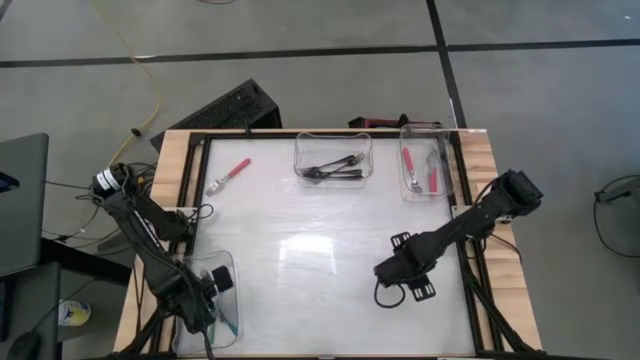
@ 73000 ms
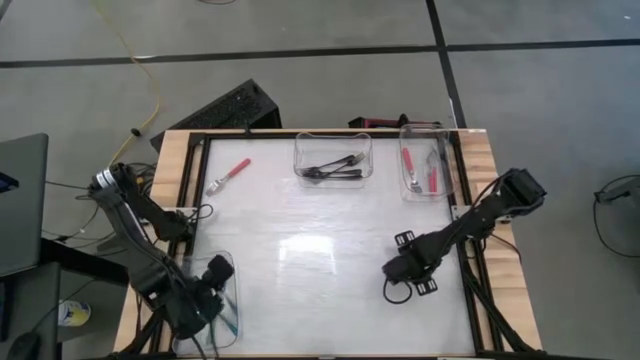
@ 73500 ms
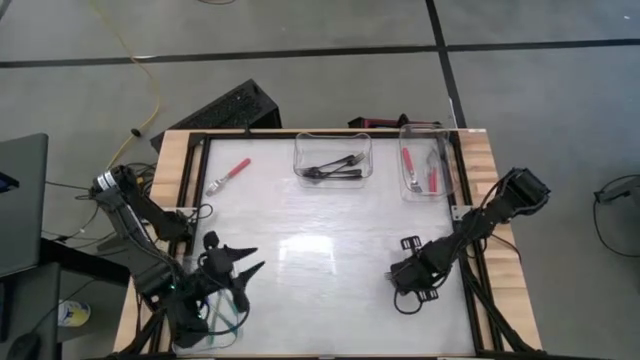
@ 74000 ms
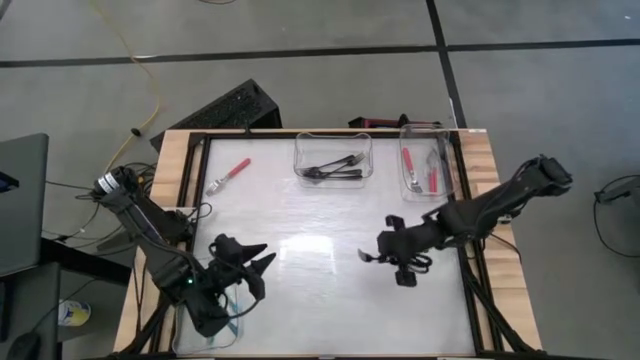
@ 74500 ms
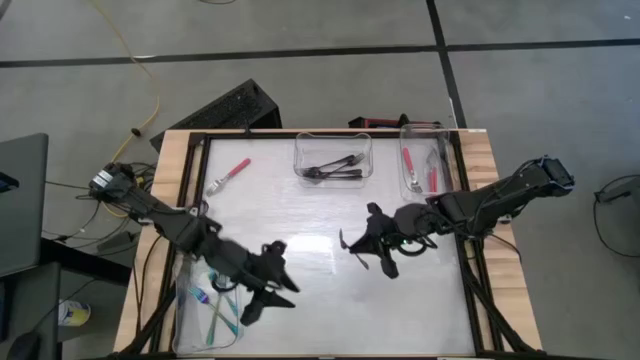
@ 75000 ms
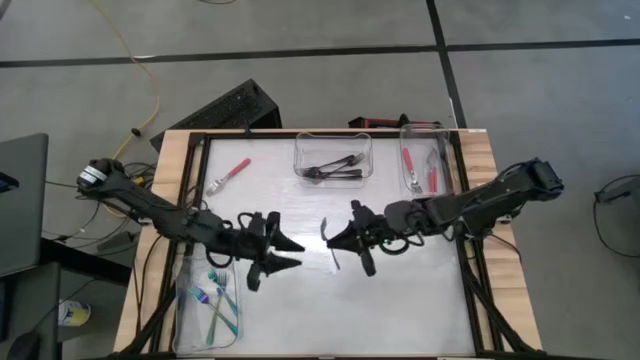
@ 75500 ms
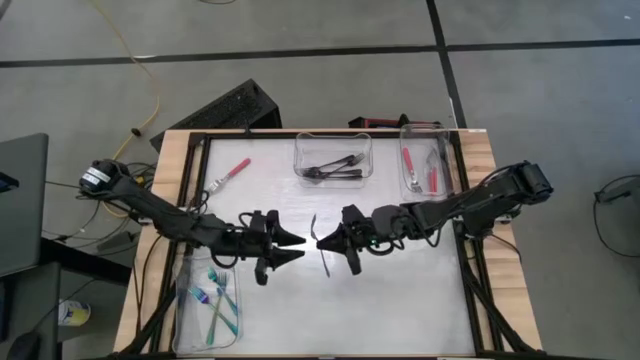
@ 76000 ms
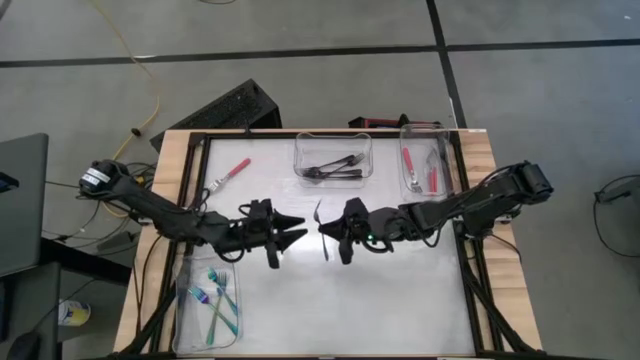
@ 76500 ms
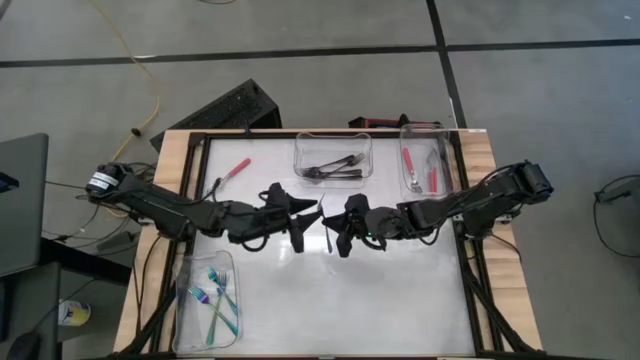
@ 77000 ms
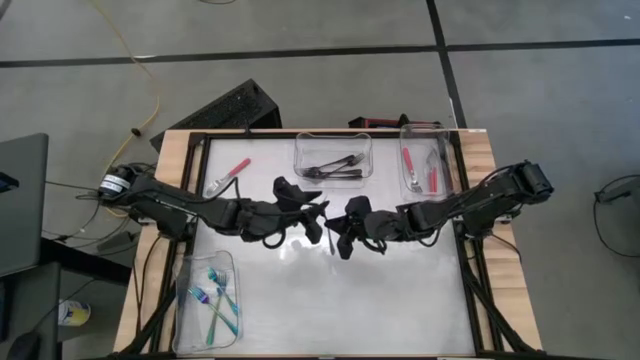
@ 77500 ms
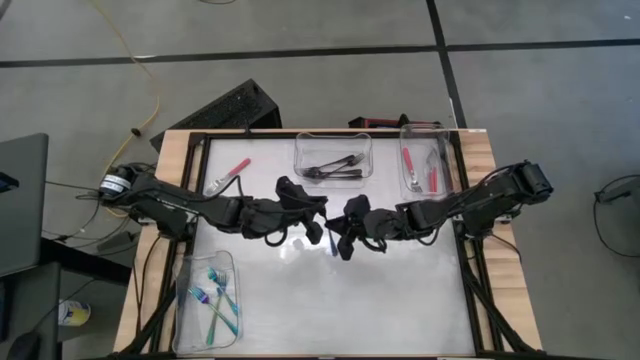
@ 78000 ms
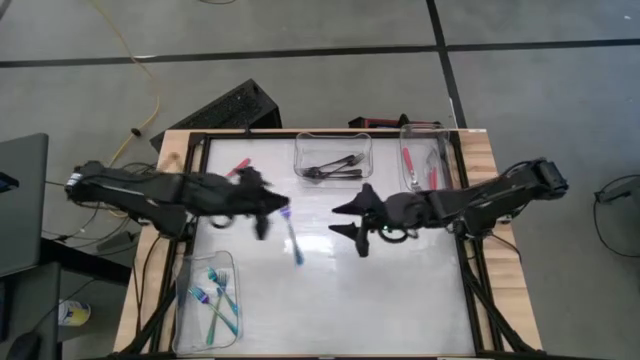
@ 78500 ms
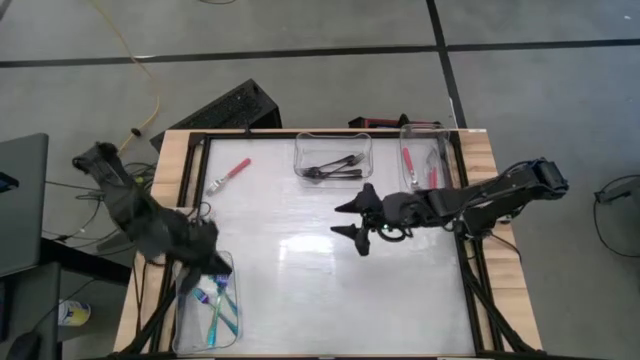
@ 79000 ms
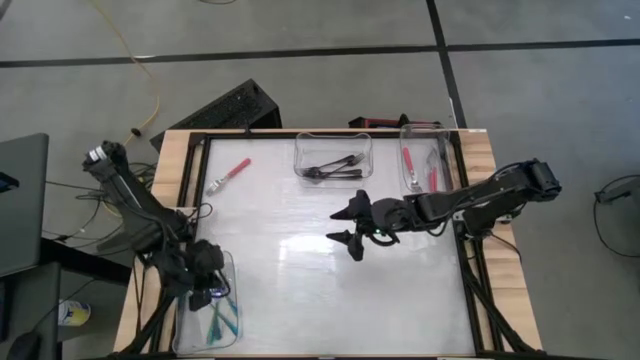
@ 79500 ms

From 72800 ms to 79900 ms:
Task: Sort silverware by color (type)
Put the blue fork into the bottom left transparent bin

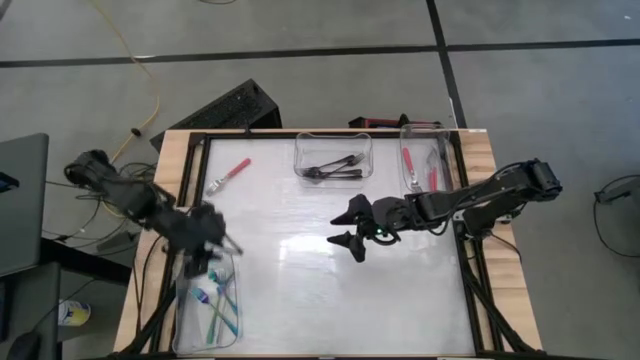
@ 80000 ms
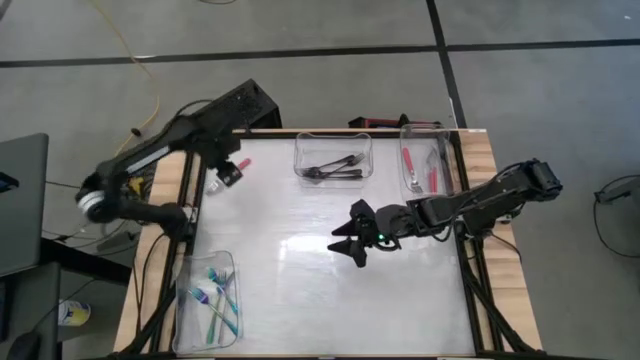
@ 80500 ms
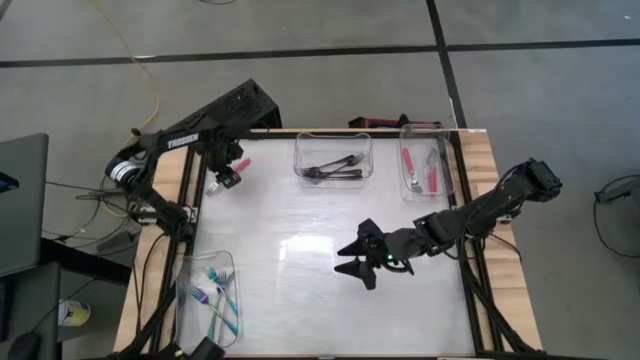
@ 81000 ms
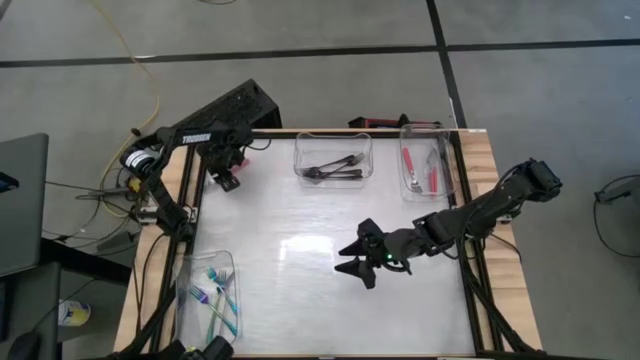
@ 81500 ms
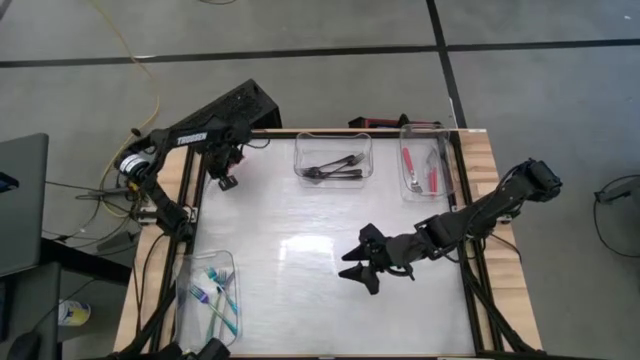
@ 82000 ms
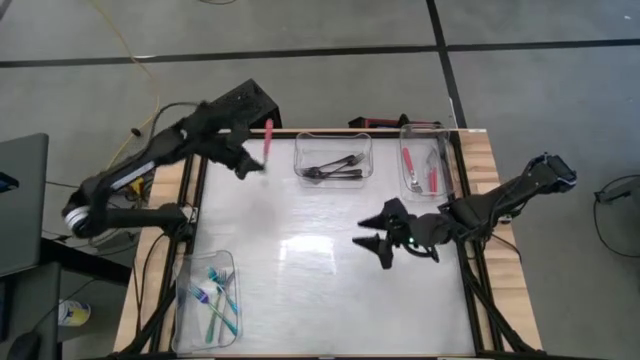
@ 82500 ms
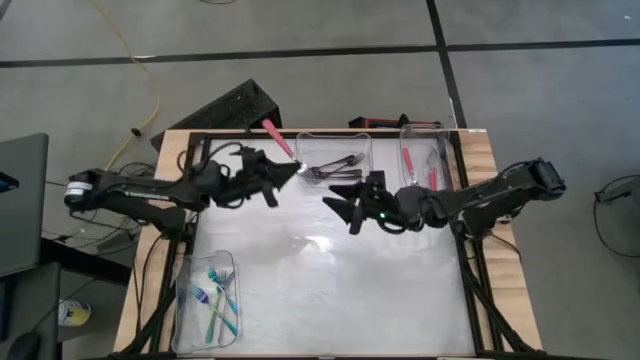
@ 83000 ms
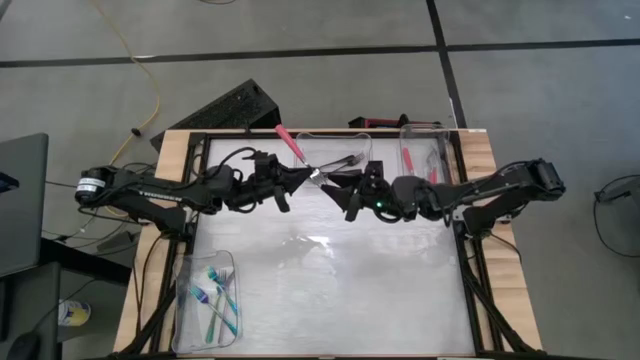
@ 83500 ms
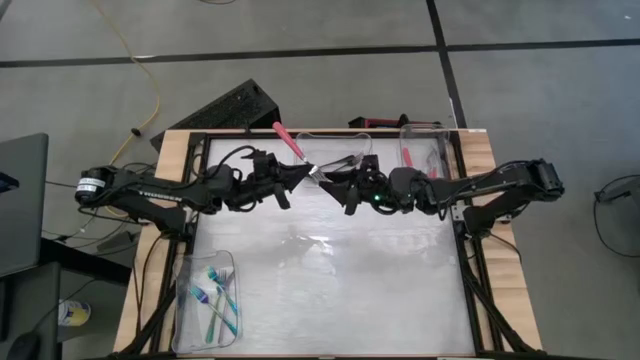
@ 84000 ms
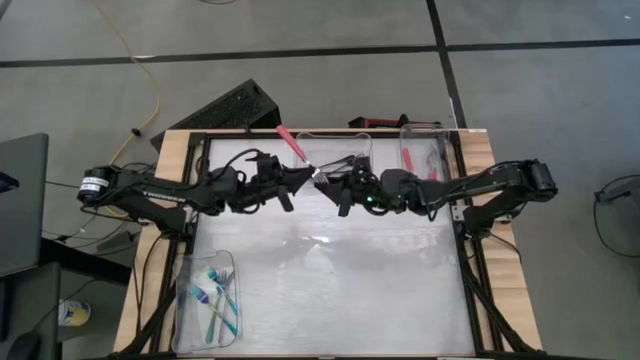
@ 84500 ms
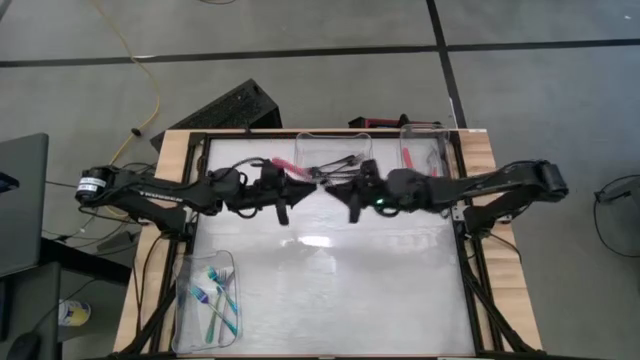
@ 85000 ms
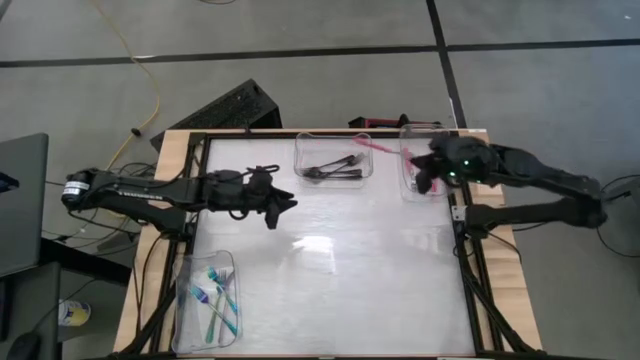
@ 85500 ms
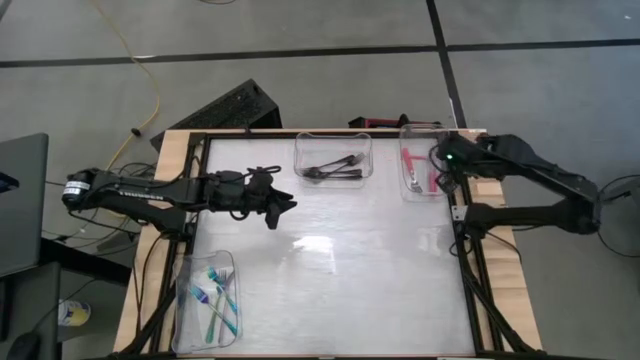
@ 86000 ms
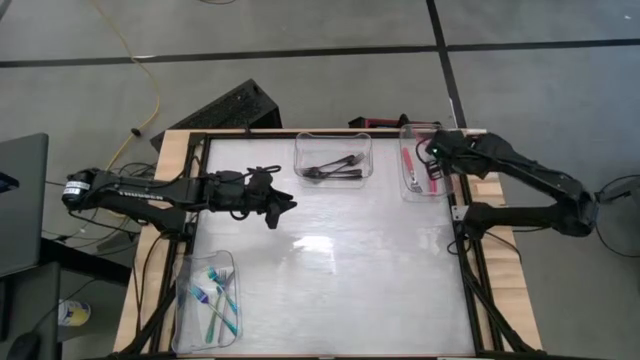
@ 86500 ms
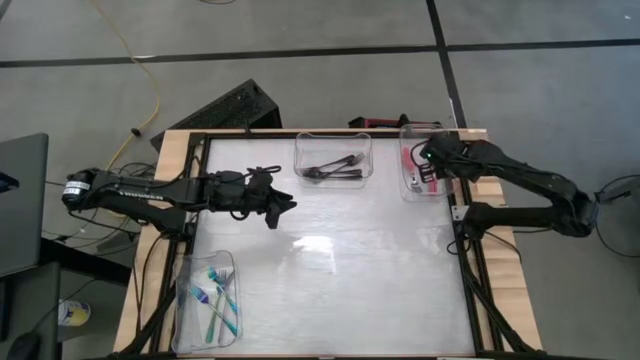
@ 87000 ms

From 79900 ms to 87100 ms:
Put the pink fork into the top right transparent bin

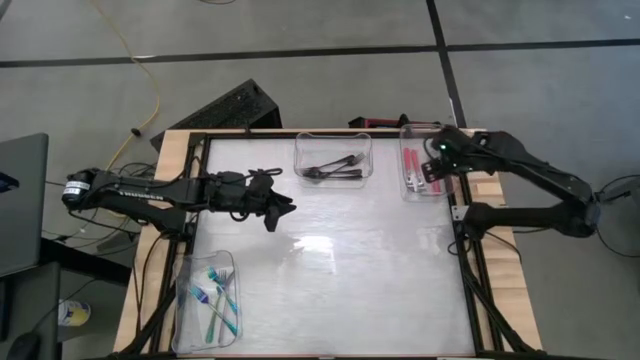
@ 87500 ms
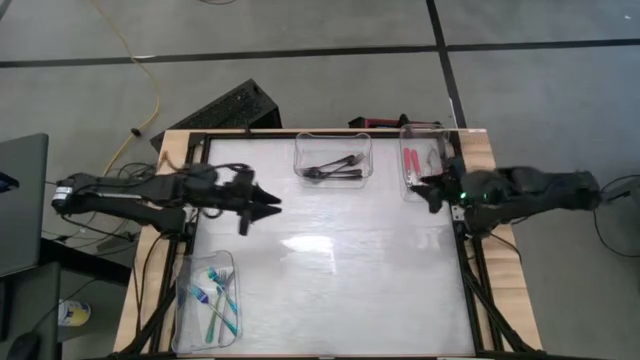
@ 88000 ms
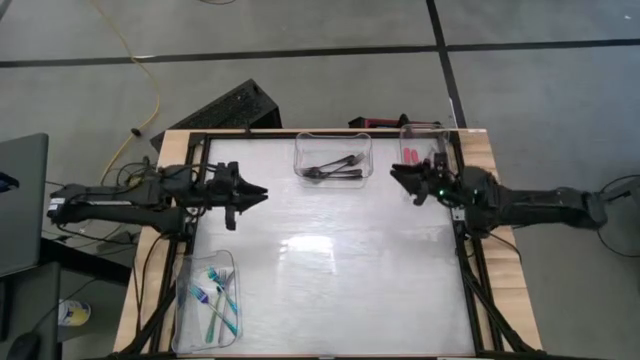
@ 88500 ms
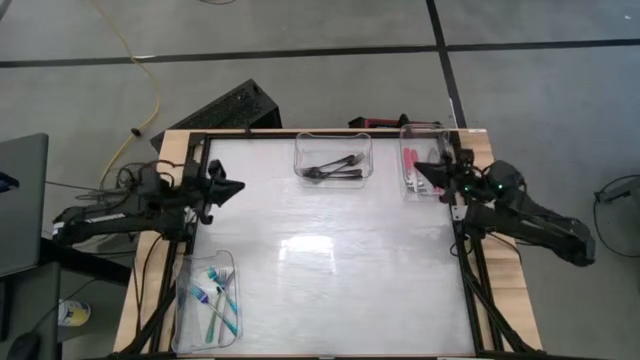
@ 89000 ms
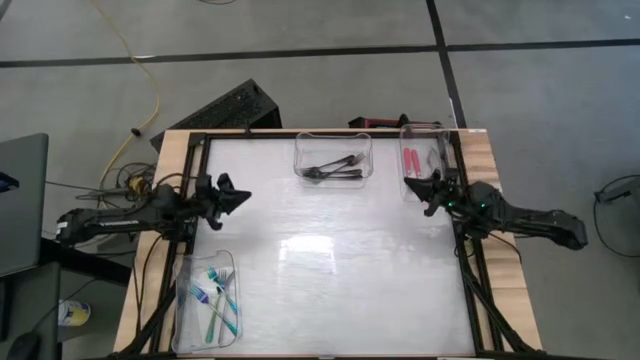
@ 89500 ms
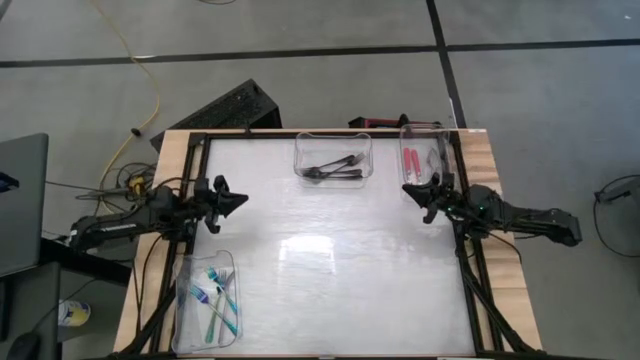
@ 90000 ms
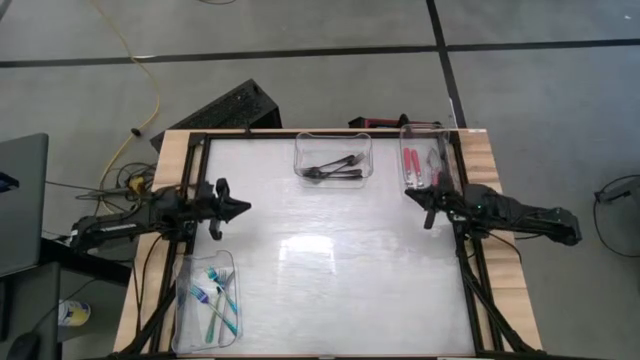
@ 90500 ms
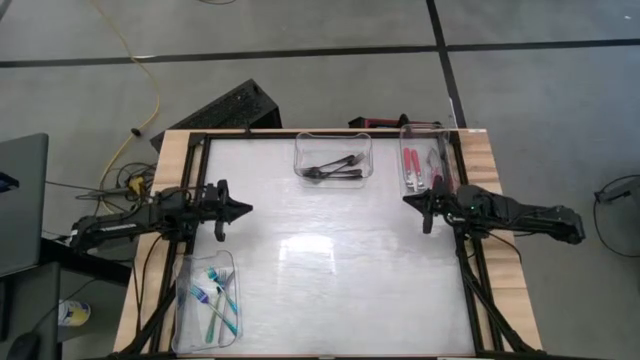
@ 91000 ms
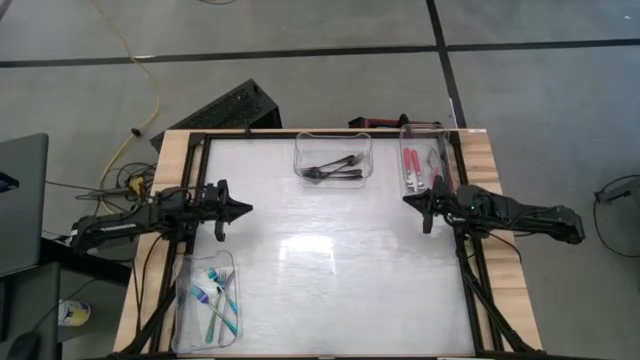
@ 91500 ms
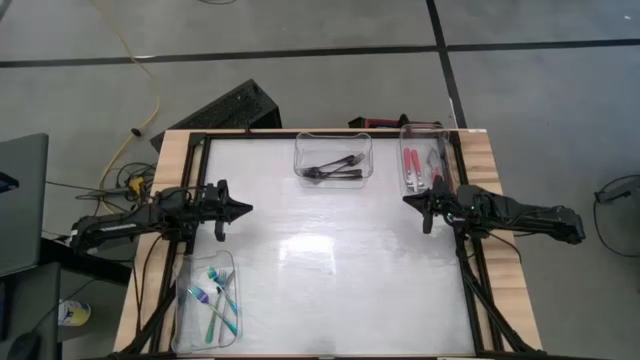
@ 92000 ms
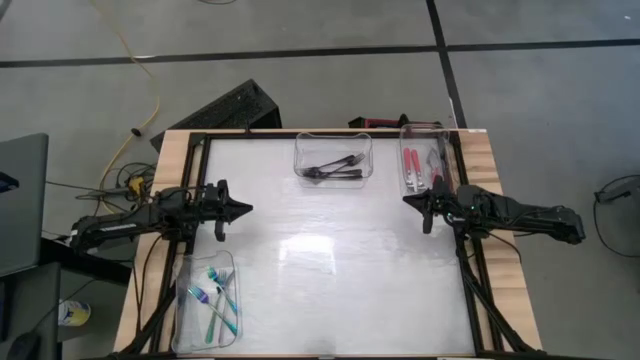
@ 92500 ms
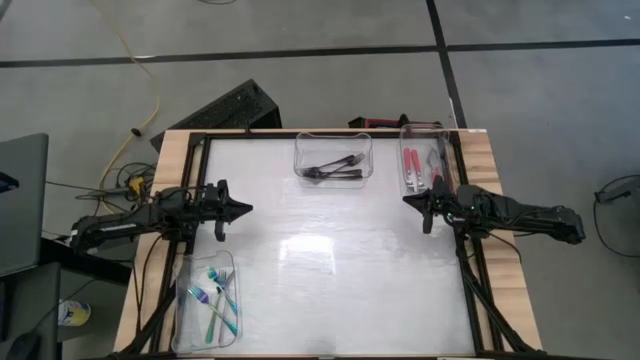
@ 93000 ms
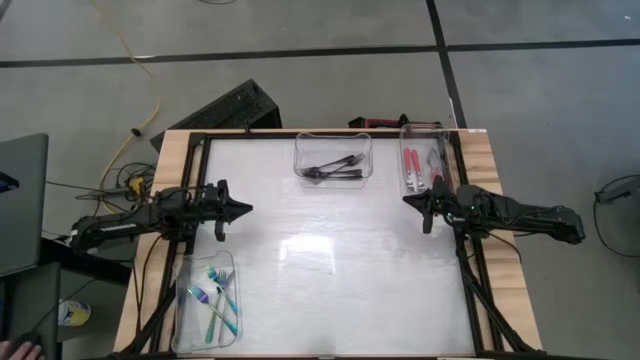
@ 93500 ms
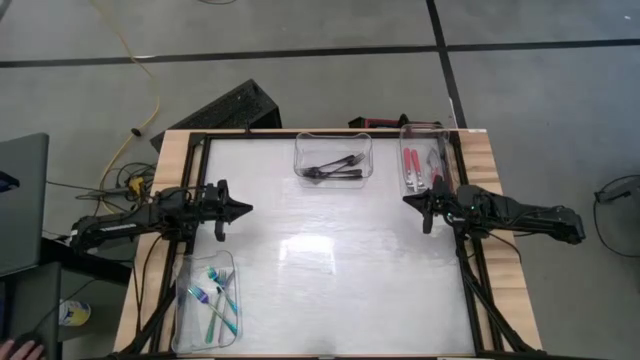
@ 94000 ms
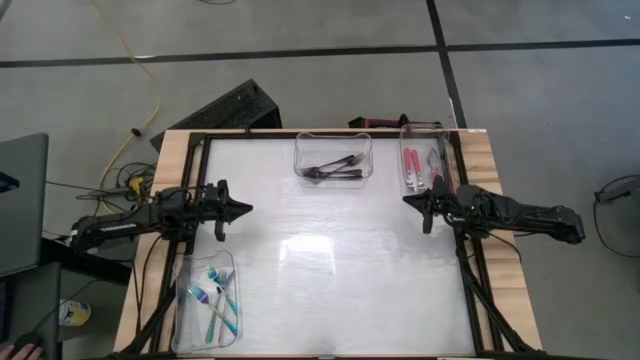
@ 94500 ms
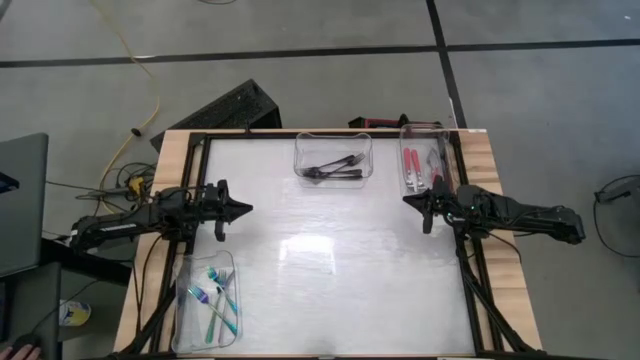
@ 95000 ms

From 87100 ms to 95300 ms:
Return to Home Position
